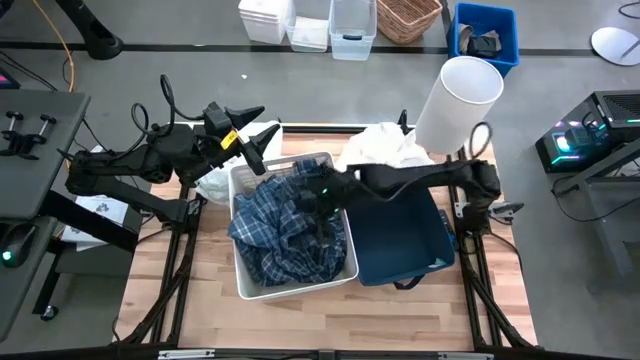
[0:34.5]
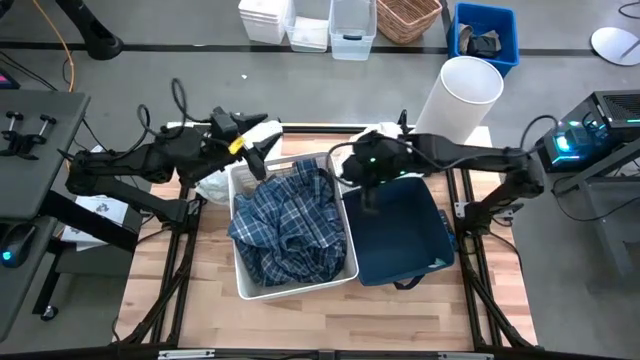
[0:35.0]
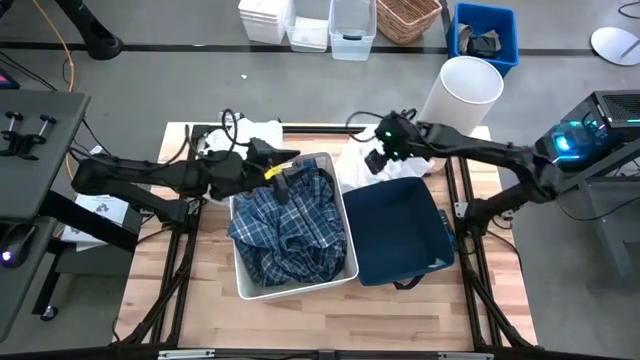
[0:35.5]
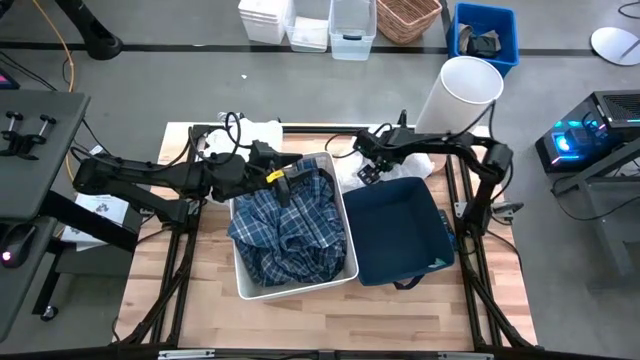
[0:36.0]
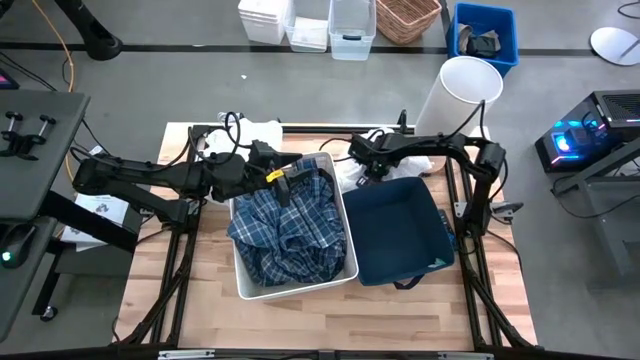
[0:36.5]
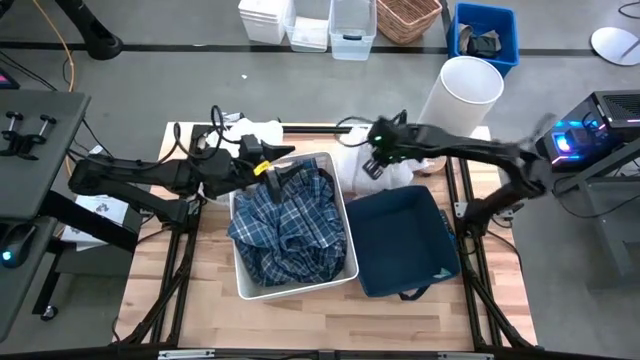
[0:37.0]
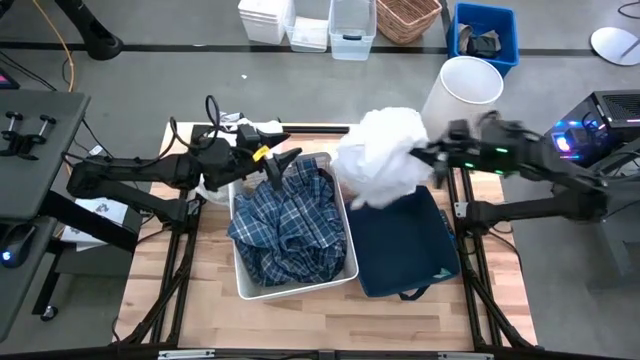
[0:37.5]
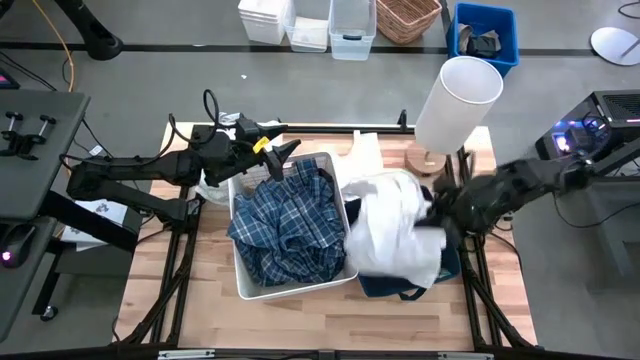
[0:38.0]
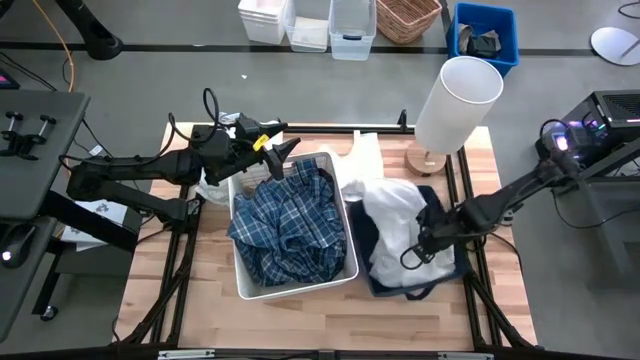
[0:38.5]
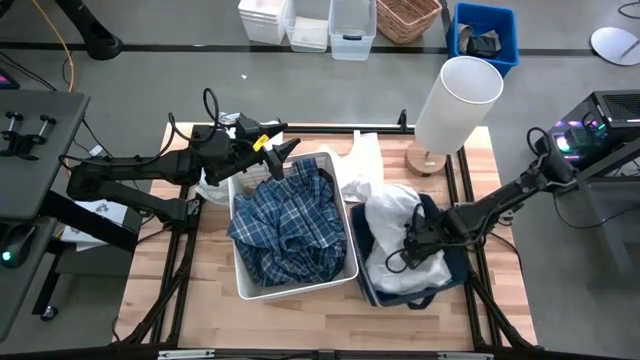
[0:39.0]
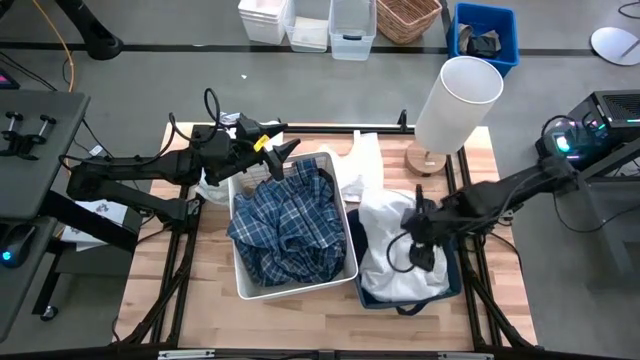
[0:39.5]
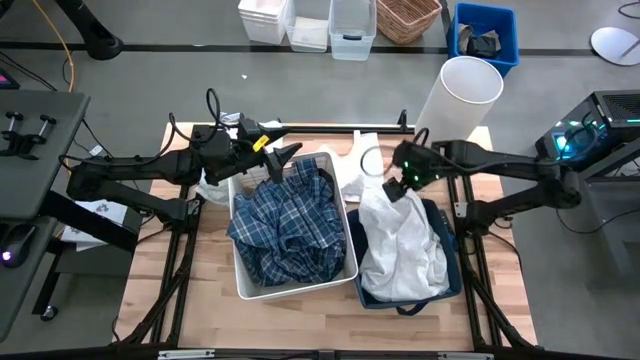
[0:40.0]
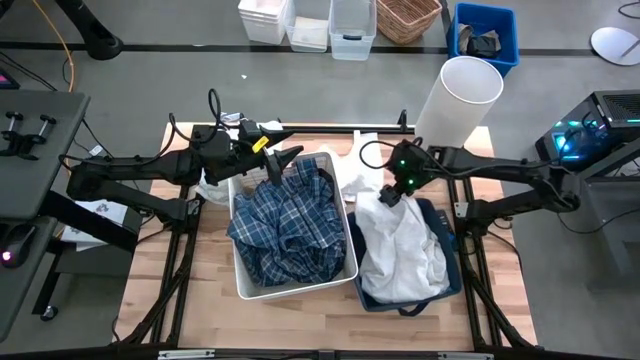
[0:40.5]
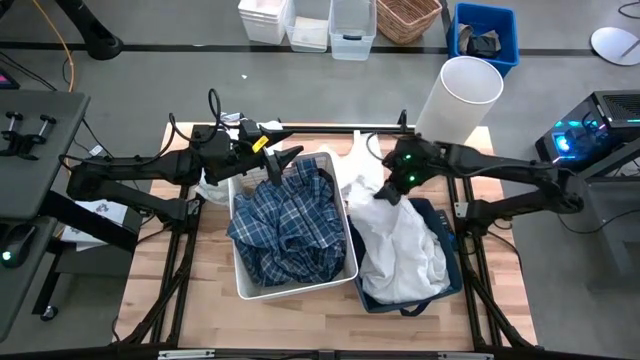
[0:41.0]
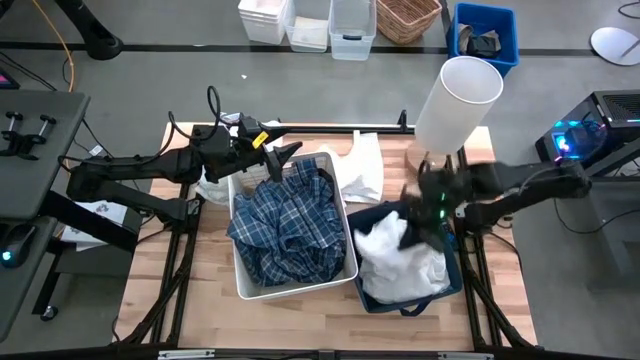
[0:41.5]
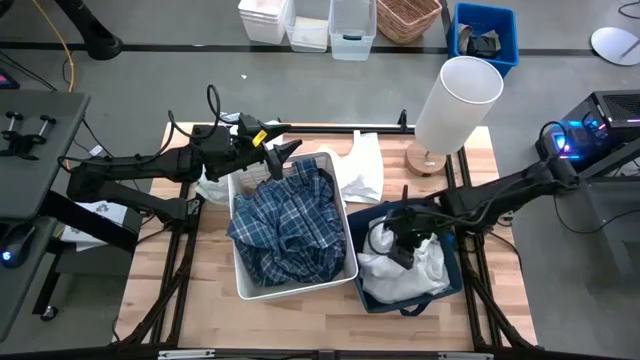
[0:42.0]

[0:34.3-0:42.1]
Task: Sort clothes
Put the white shirt into the blue laundry bin

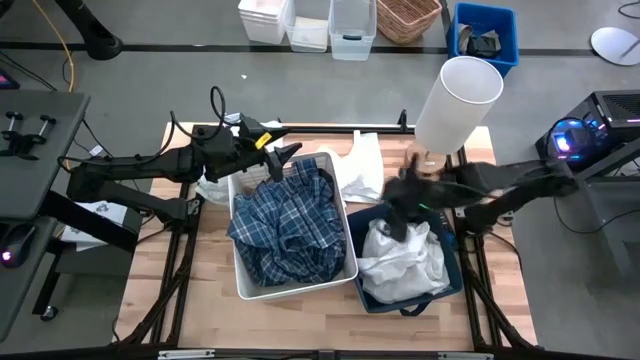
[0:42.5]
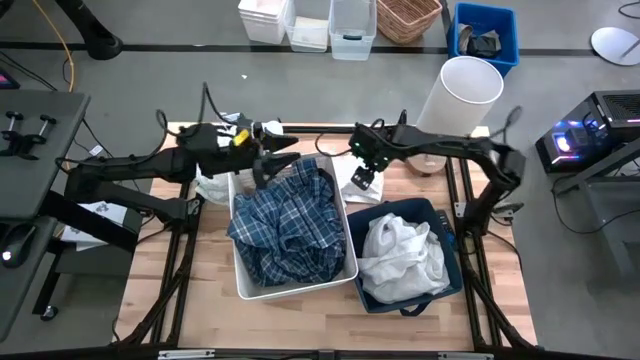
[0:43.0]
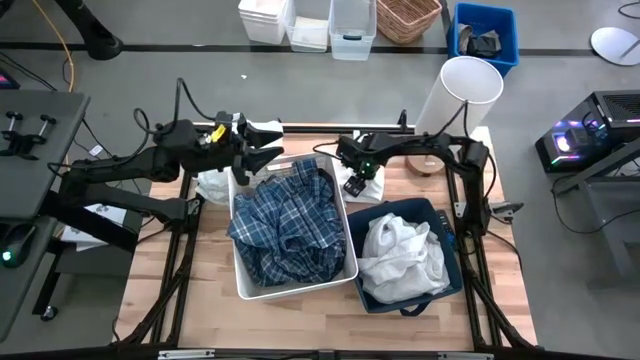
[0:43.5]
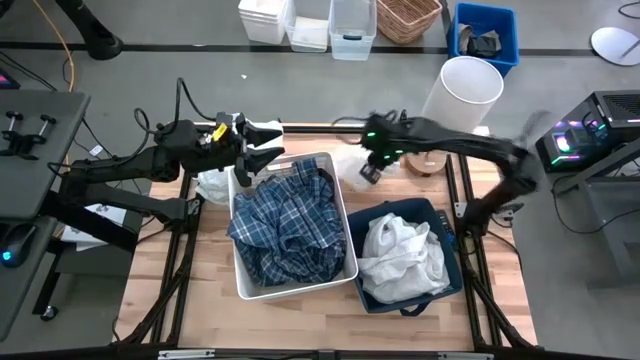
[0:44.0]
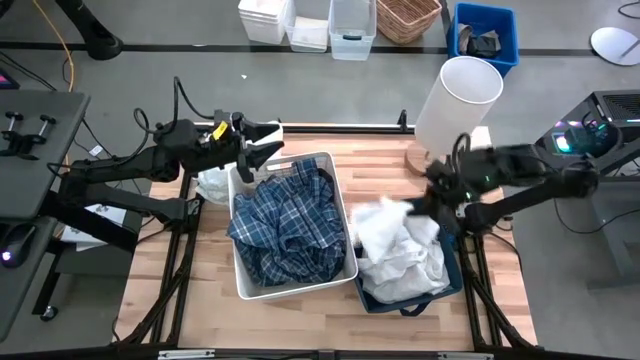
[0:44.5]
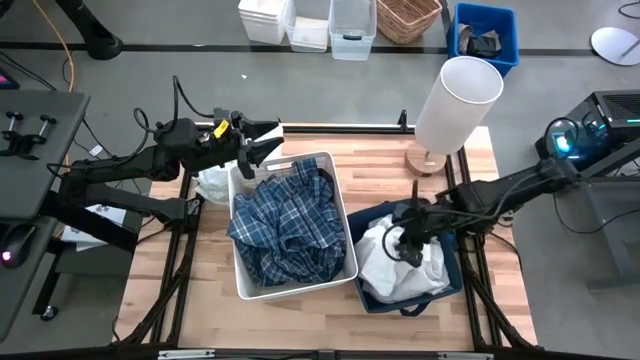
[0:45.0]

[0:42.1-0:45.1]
Put the white shorts into the blue laundry bin

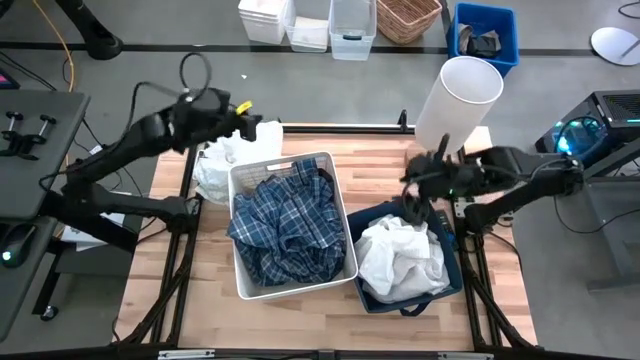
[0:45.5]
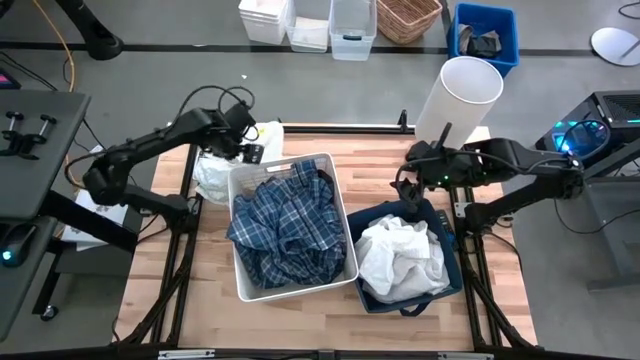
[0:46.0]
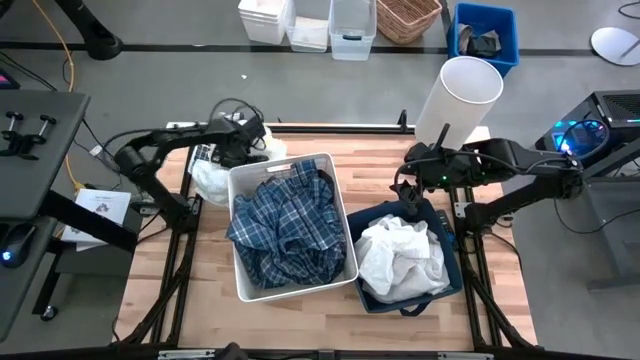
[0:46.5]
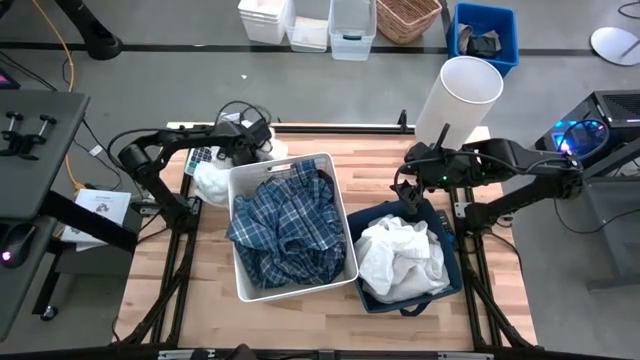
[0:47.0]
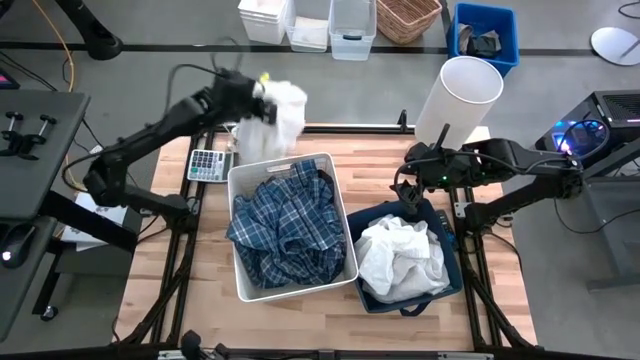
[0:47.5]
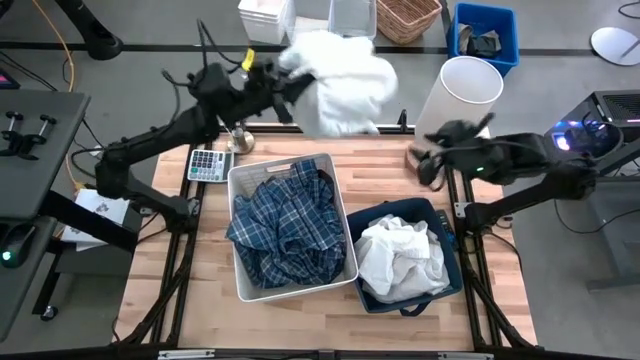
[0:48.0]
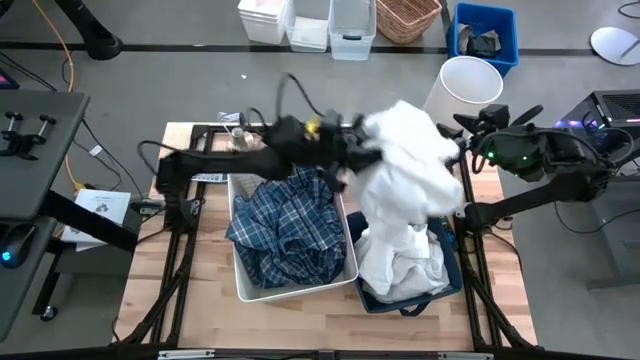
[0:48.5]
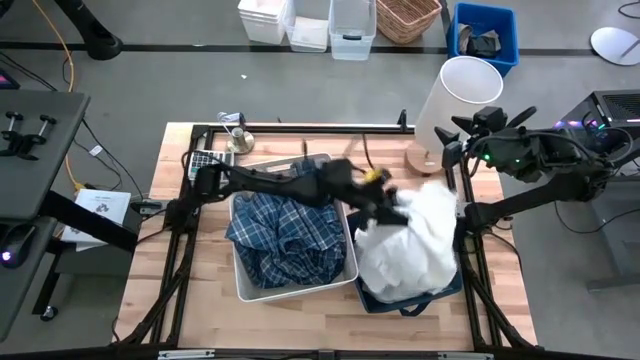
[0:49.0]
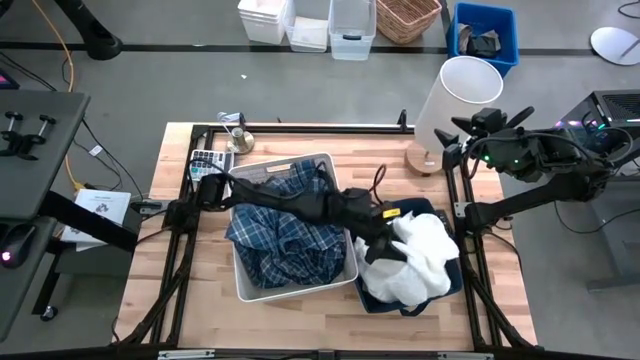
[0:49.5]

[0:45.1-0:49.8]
Put the white blouse into the blue laundry bin

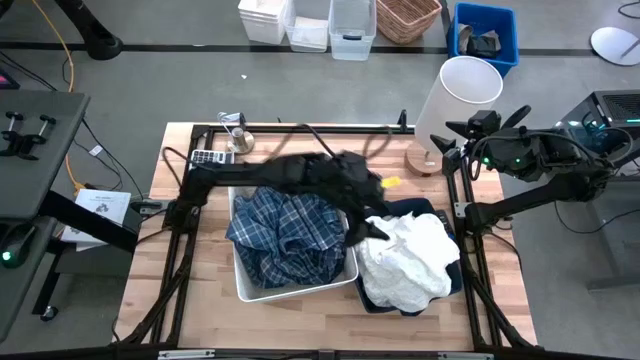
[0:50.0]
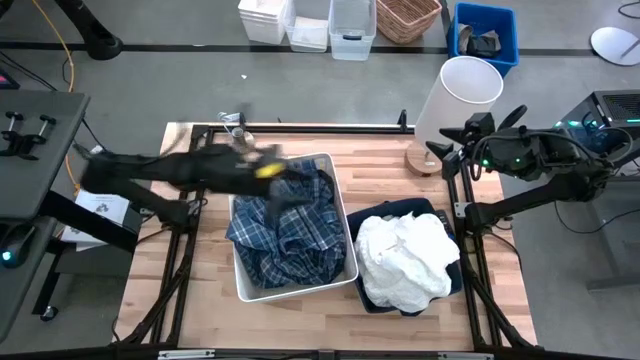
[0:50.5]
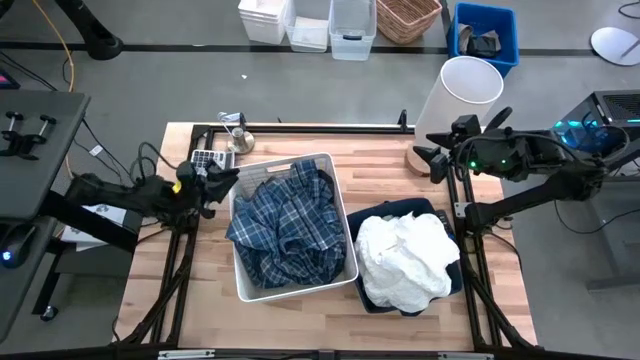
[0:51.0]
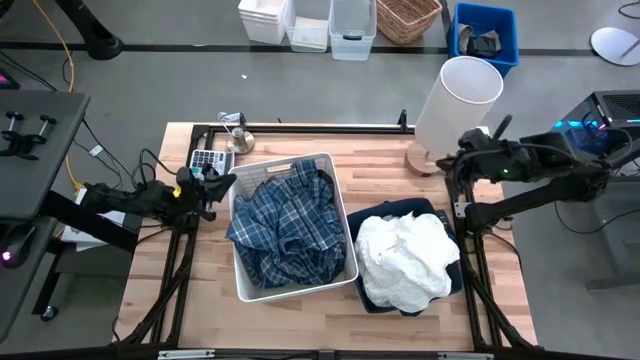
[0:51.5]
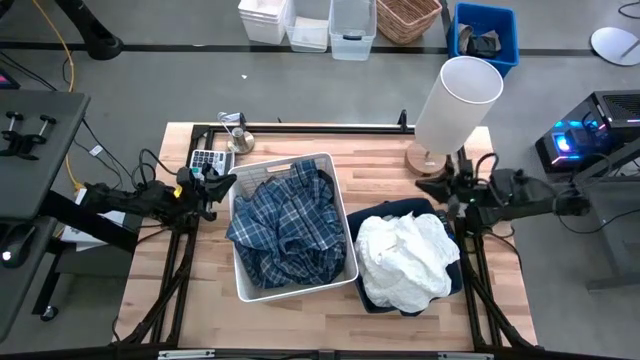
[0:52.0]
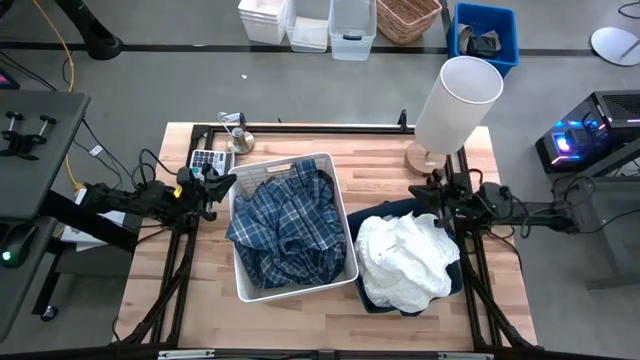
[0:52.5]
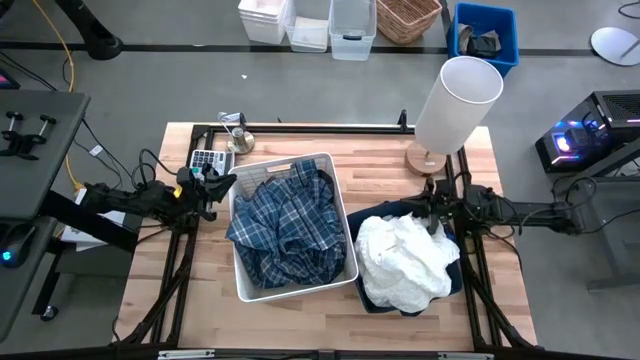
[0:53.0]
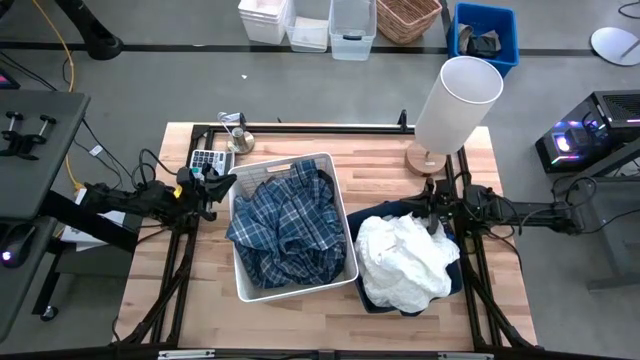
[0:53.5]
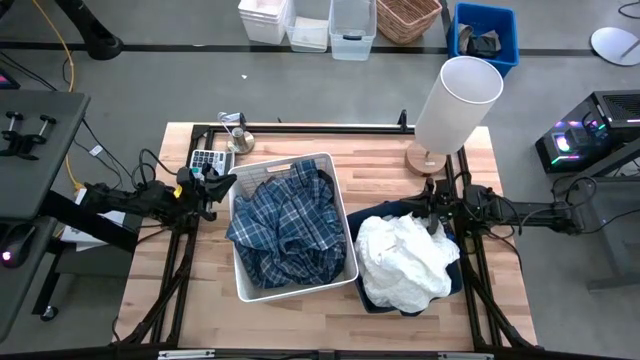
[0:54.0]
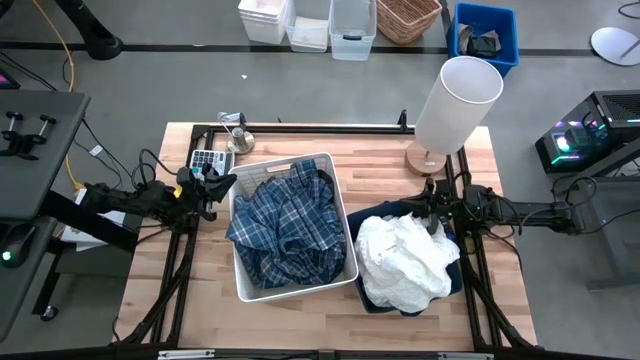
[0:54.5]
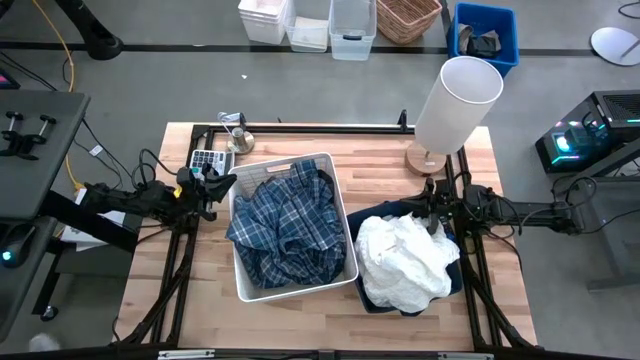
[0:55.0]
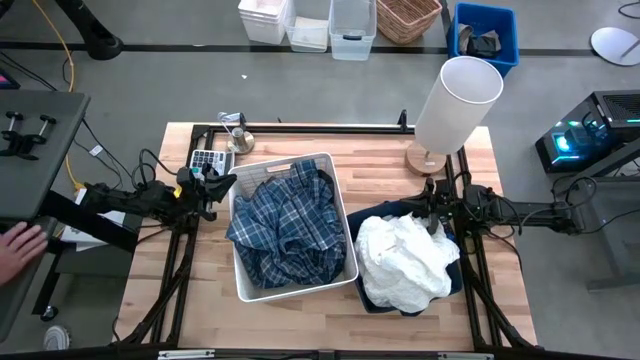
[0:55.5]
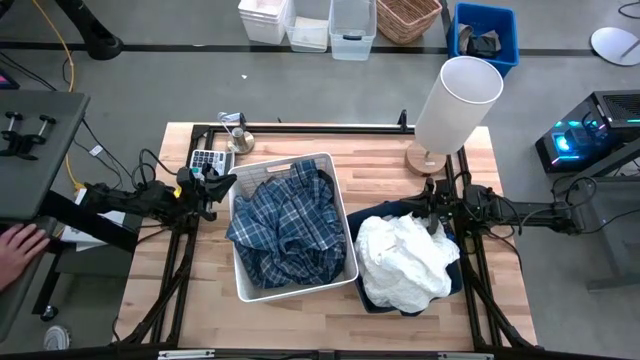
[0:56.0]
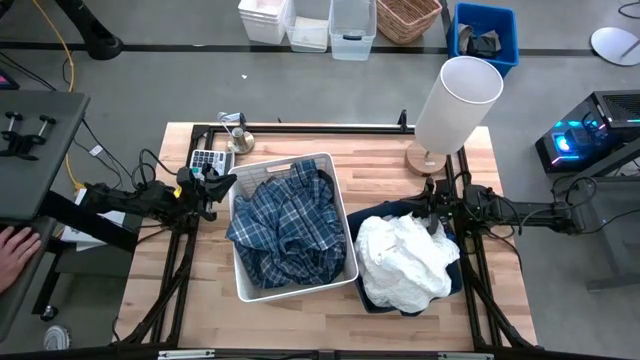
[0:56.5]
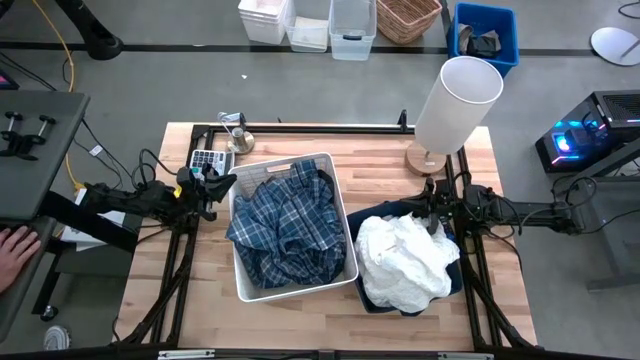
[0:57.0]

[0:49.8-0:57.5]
Return to Home Position
